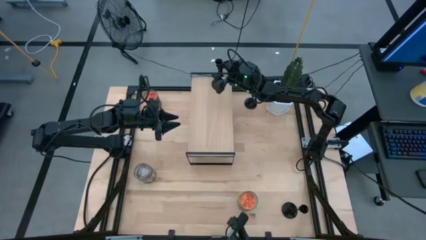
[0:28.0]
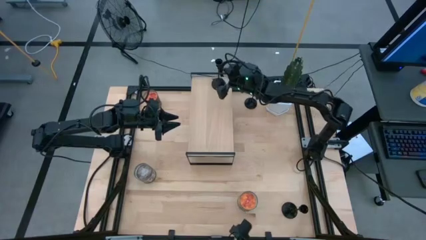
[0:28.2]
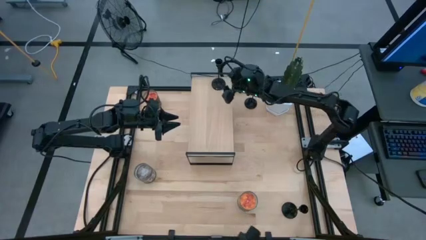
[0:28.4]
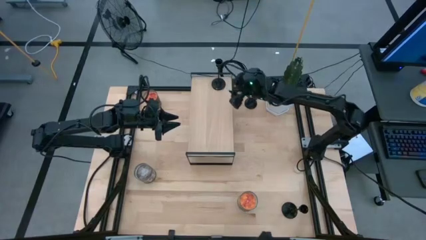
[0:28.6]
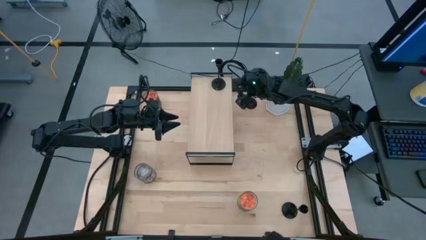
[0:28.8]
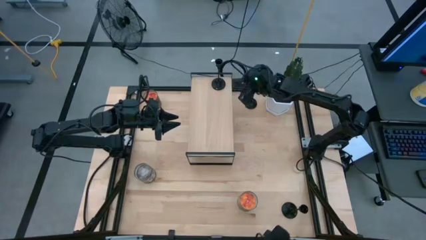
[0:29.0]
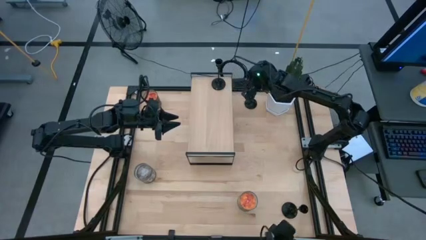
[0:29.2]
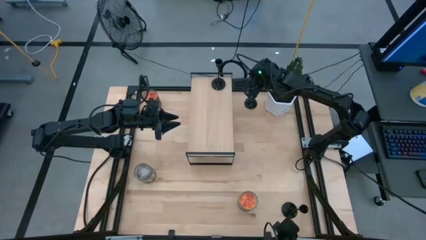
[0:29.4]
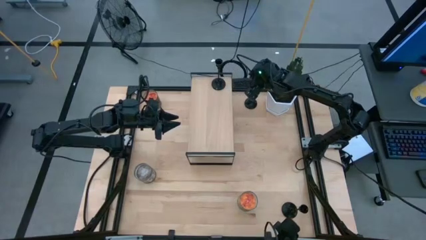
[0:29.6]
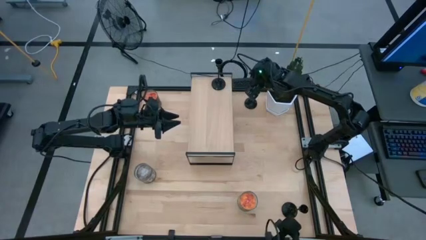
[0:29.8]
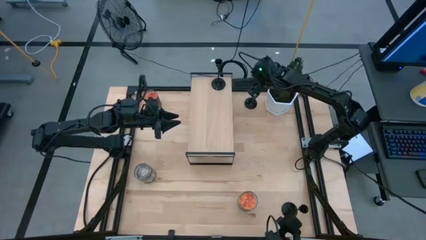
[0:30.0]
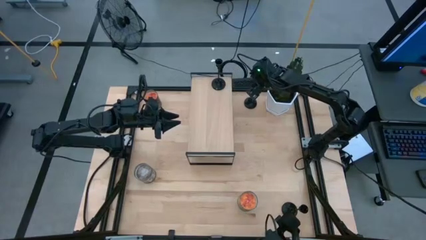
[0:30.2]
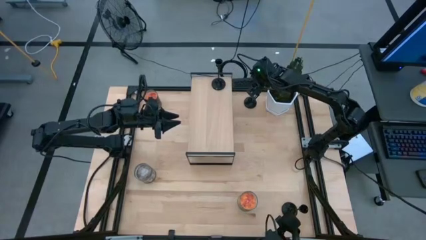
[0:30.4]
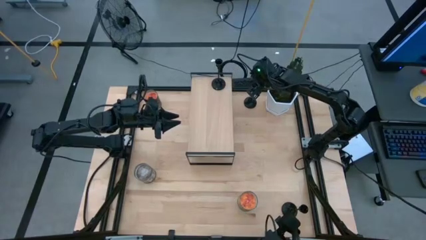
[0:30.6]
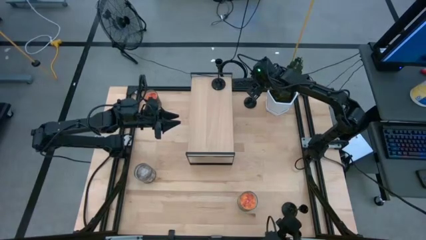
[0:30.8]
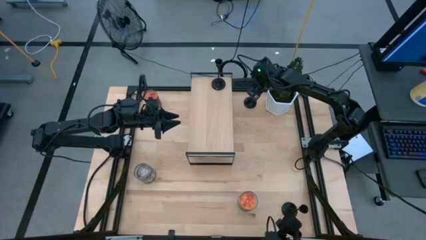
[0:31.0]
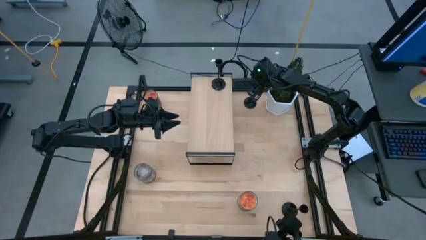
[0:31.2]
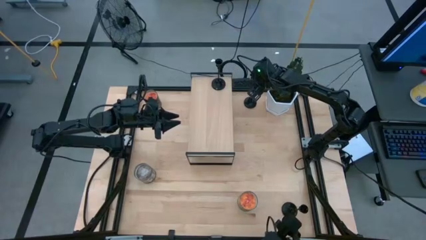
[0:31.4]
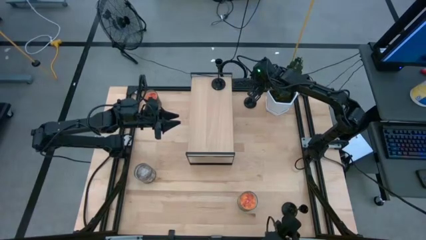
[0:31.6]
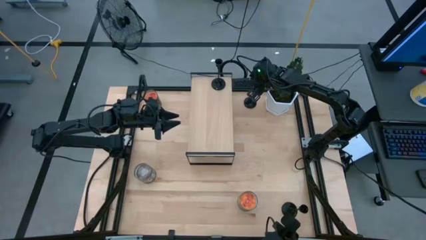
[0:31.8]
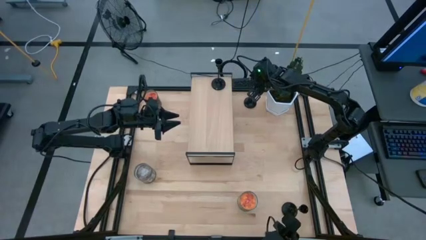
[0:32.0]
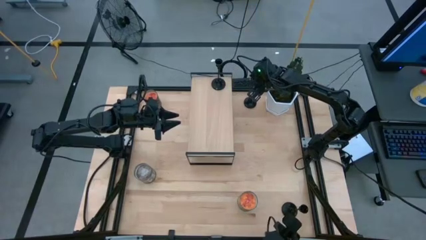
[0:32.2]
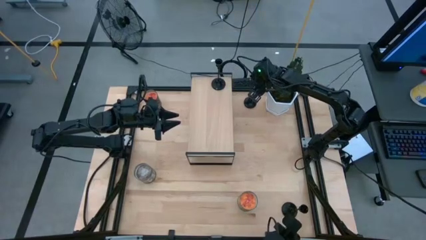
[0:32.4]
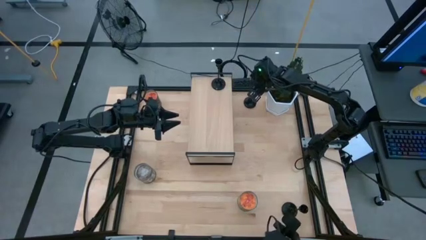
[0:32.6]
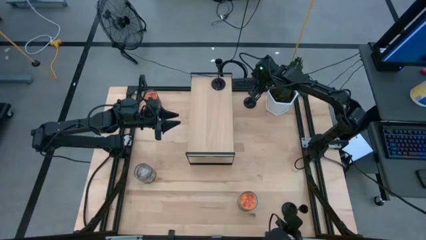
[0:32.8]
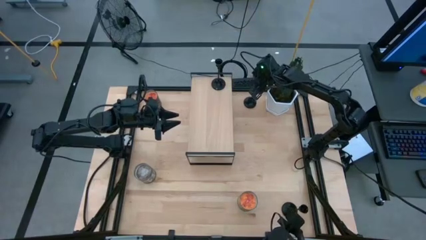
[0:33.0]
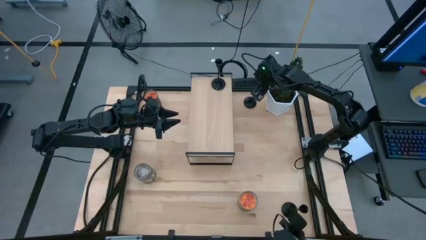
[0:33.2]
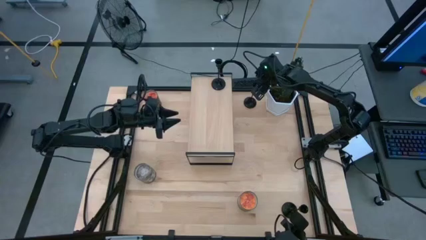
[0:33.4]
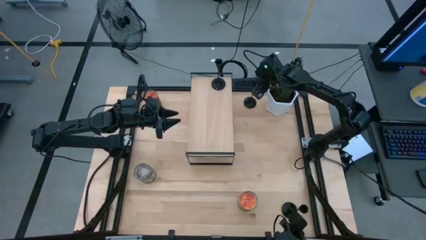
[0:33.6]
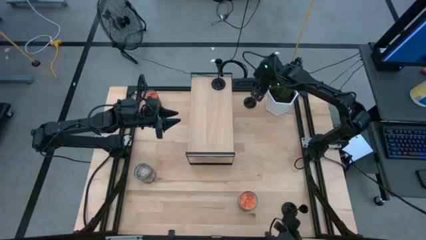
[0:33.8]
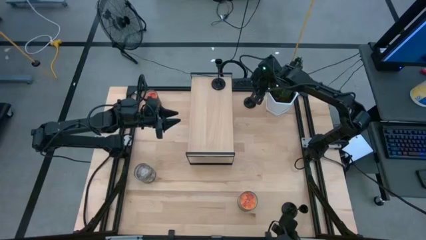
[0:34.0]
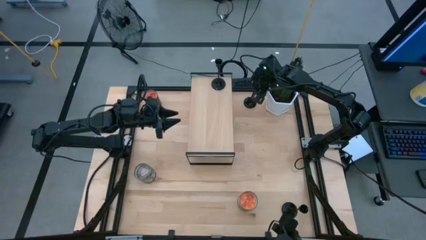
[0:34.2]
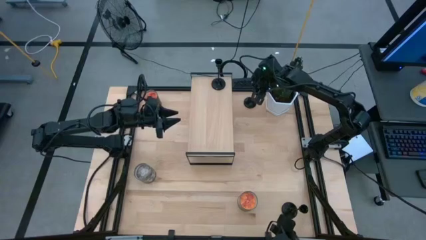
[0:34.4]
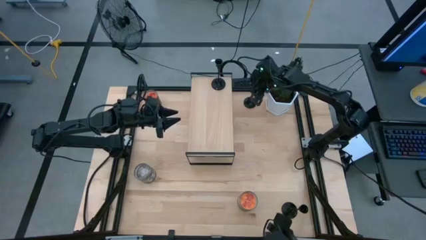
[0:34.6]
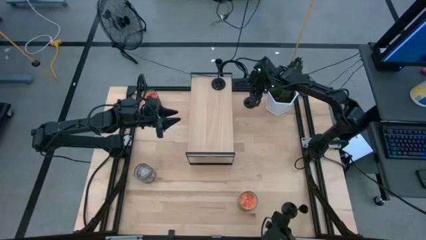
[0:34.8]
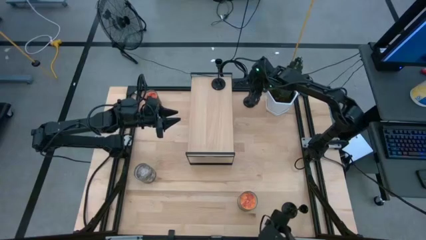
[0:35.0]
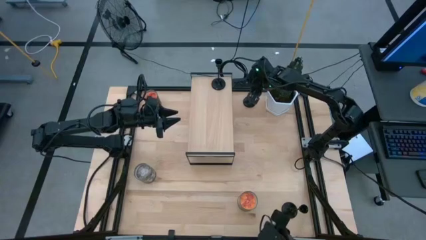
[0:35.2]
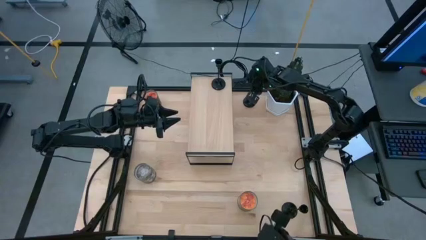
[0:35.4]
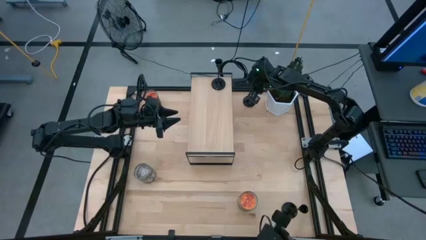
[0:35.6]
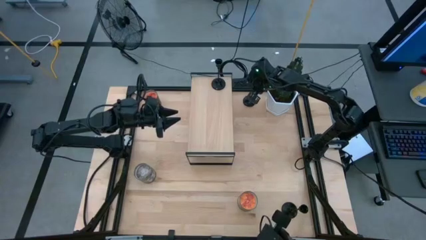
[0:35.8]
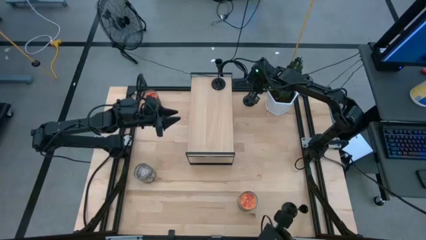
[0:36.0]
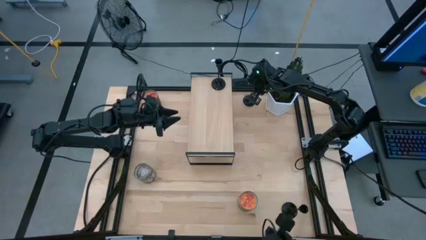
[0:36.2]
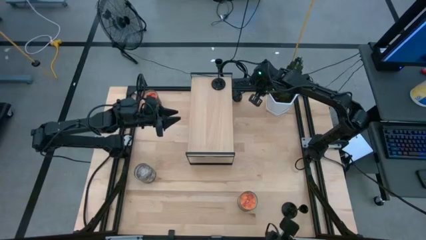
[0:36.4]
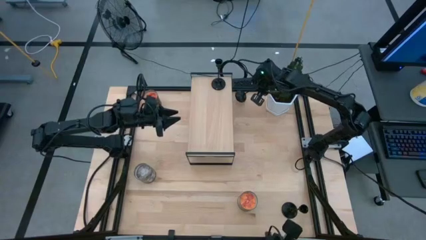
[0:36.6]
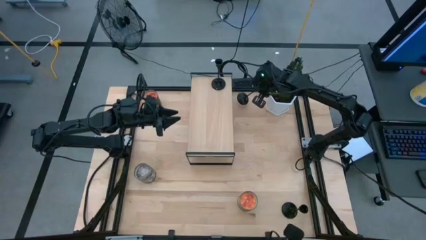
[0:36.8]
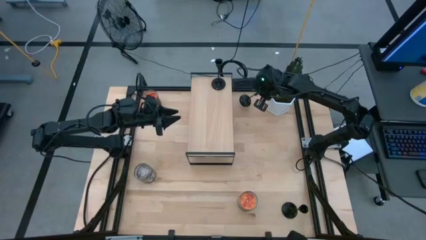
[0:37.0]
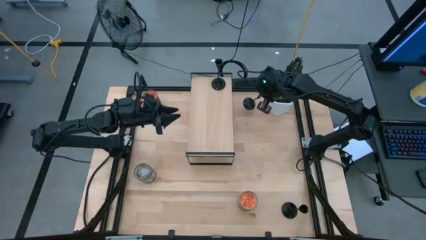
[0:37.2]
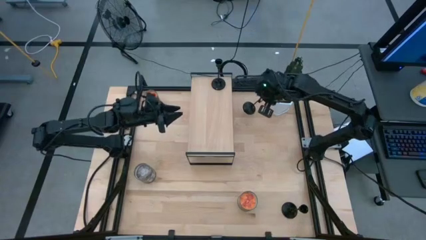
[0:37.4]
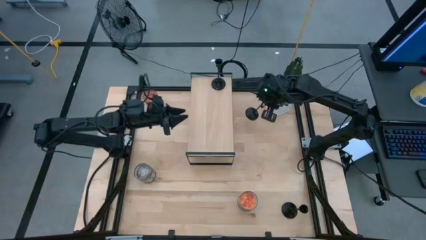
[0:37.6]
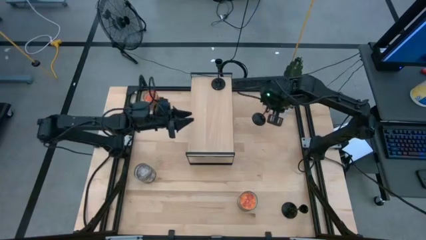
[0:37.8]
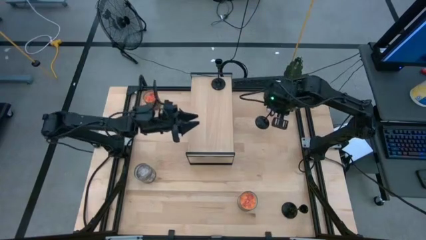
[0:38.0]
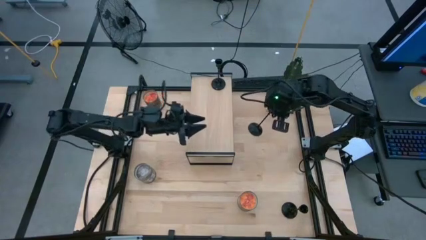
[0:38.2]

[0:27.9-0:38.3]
Task: Pick & Place candle stick holders
Put the top black candle holder on the shelf

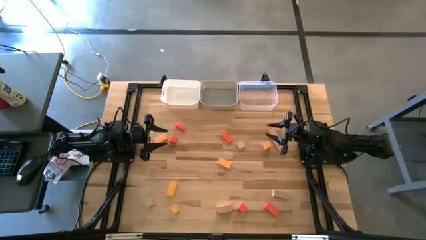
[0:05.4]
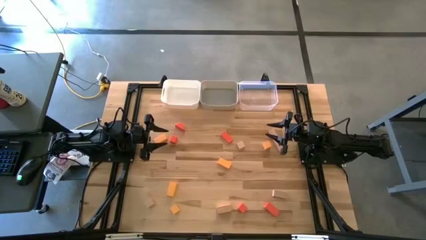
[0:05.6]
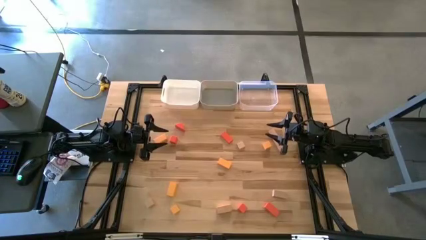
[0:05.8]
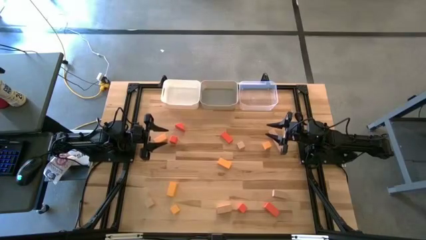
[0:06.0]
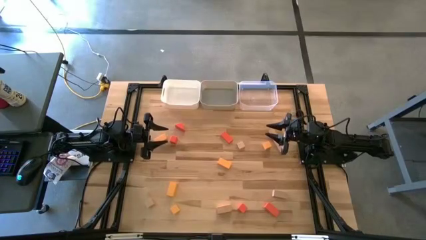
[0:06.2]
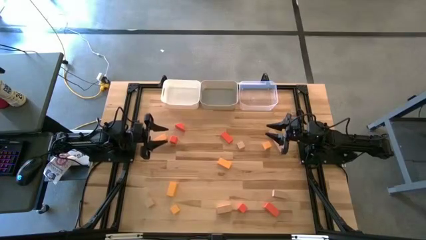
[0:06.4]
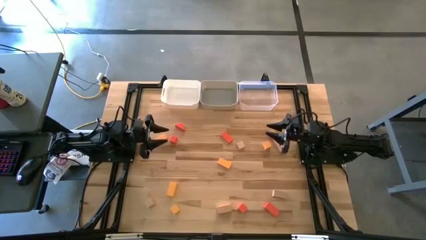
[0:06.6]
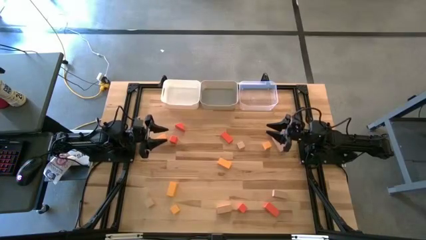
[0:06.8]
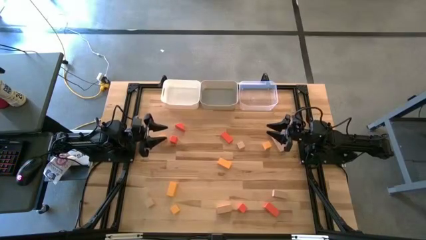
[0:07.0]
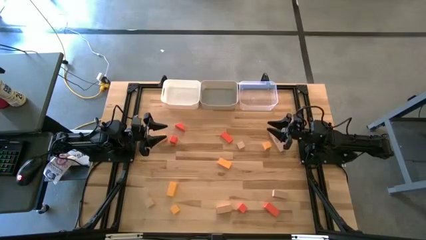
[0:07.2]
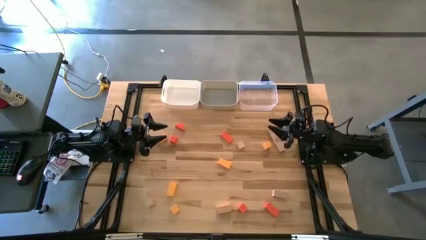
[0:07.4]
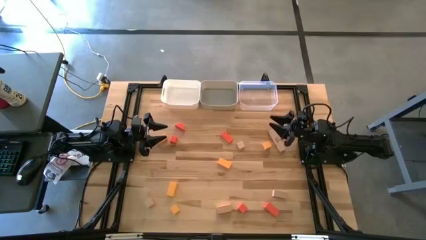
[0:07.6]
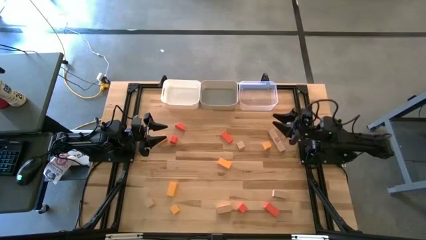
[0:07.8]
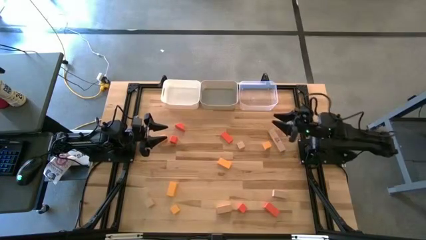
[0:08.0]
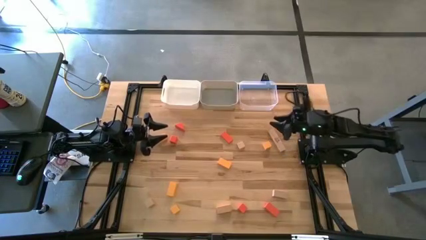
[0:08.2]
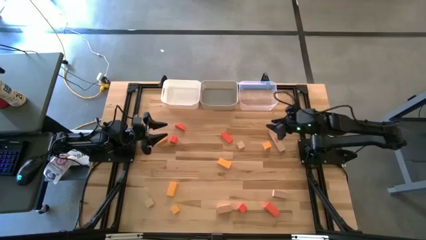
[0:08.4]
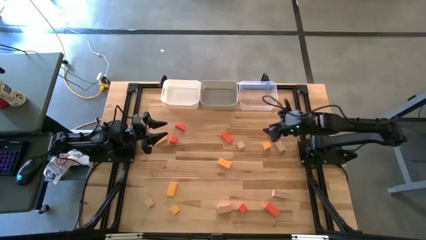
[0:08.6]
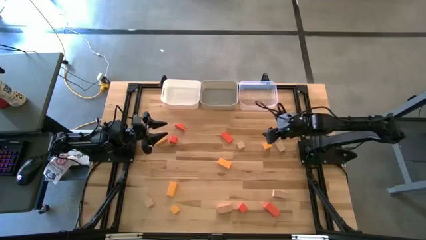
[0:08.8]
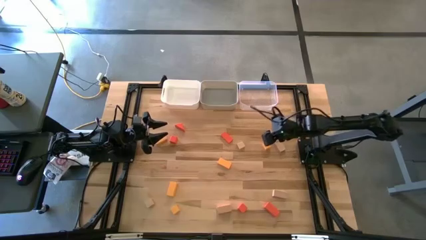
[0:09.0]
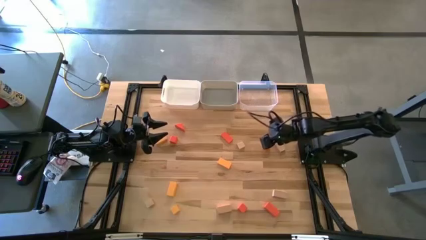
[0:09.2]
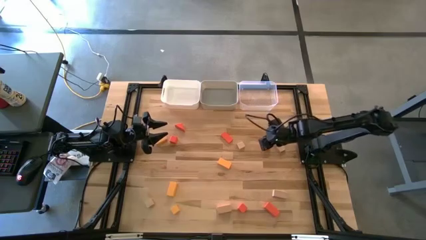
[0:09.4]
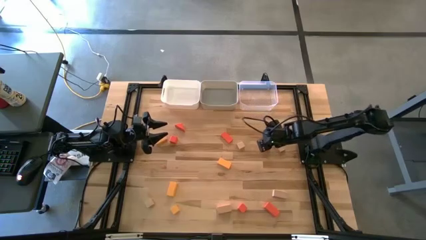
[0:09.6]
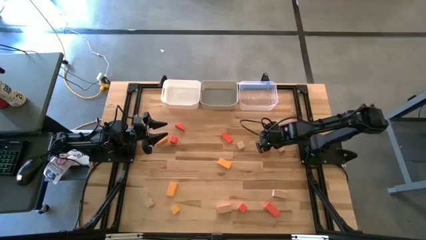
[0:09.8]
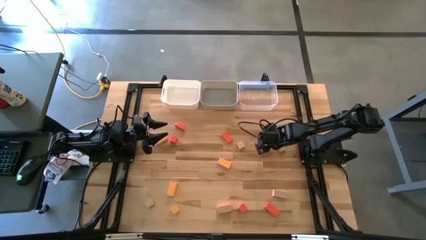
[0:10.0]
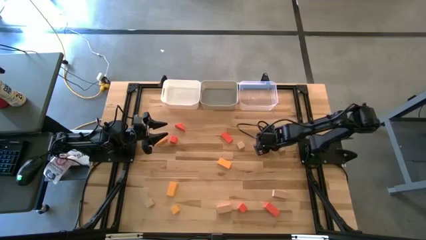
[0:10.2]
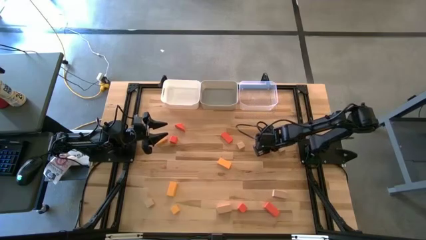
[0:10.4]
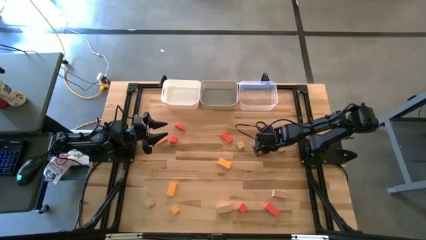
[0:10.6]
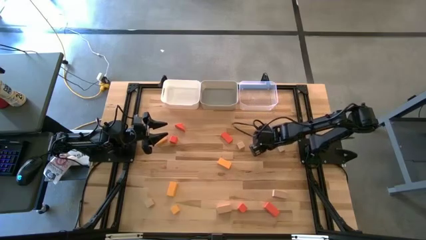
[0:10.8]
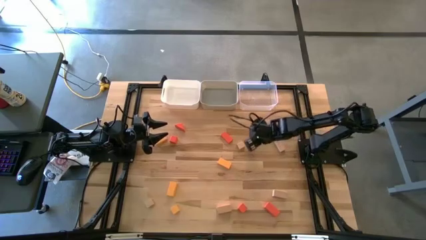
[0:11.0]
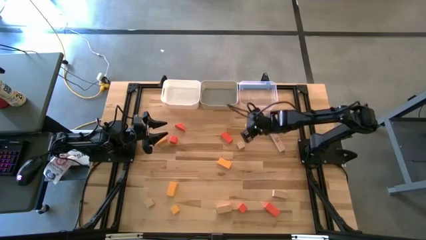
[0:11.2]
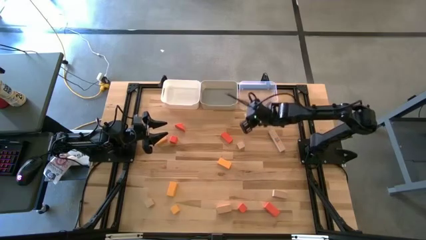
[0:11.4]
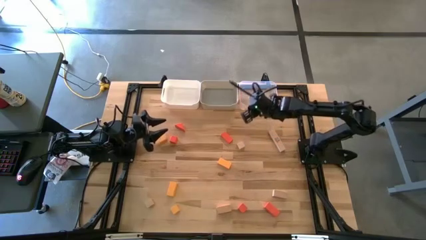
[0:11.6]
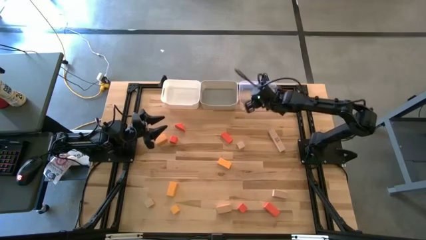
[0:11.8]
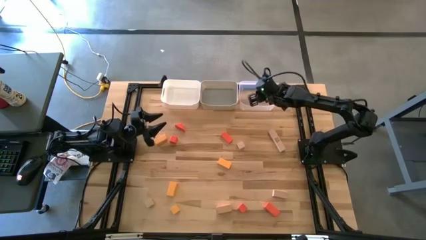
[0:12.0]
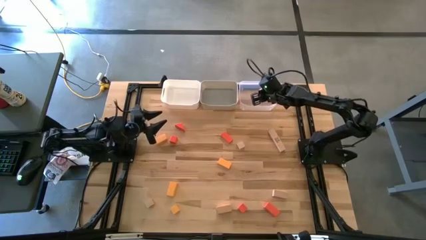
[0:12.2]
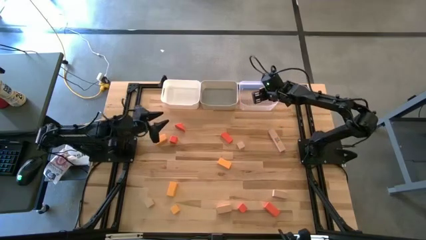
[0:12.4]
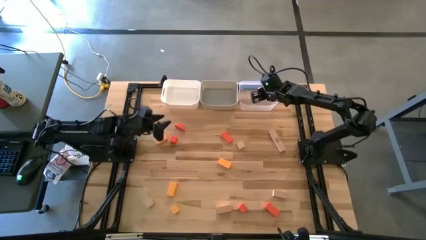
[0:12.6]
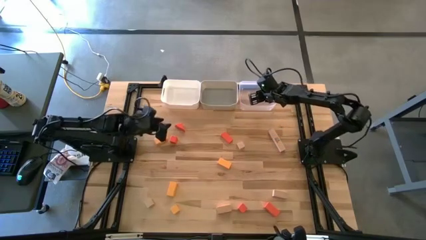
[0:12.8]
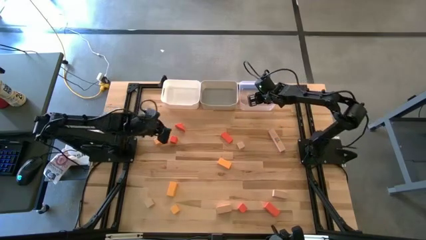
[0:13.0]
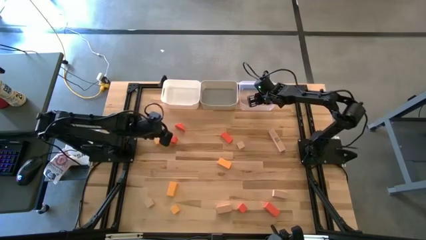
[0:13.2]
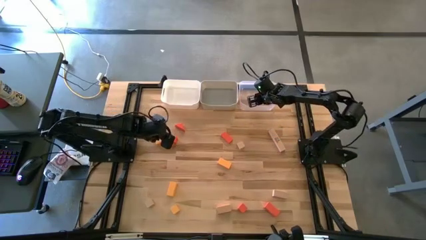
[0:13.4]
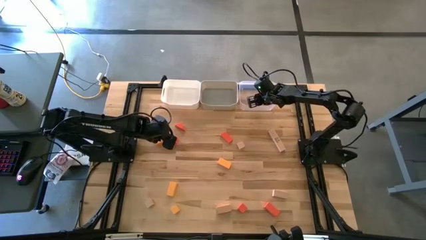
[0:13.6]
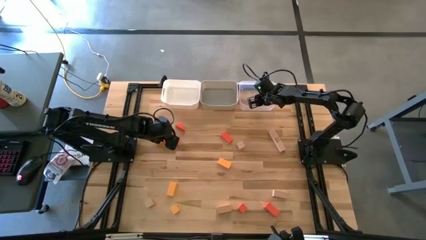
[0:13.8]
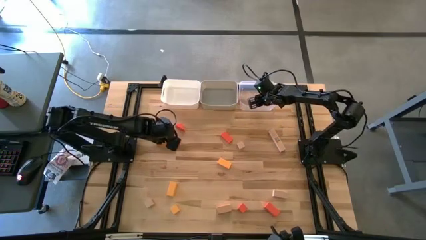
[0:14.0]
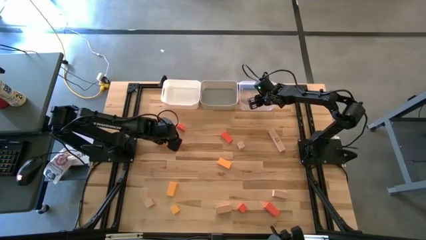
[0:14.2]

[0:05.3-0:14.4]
Task: Sort & place blocks by color
Put the yellow block into the transparent bin
